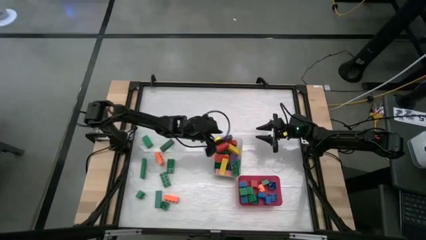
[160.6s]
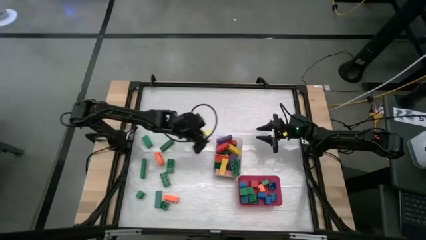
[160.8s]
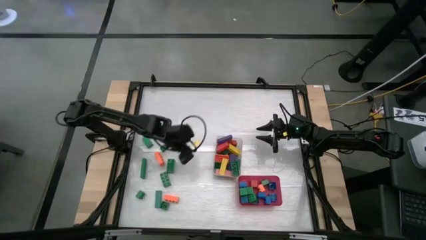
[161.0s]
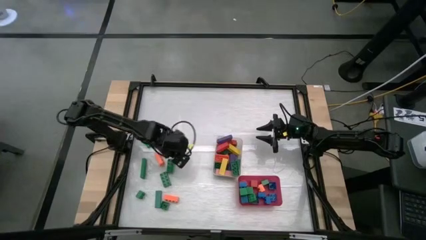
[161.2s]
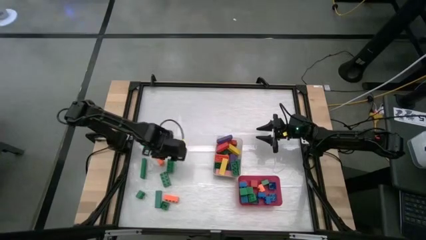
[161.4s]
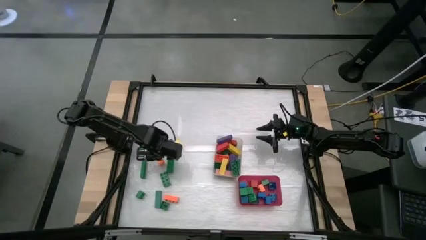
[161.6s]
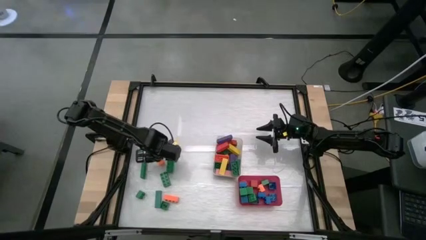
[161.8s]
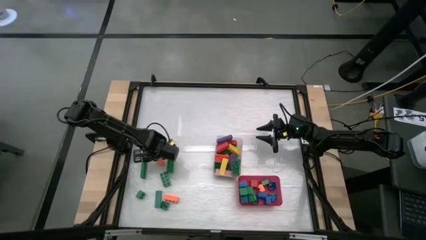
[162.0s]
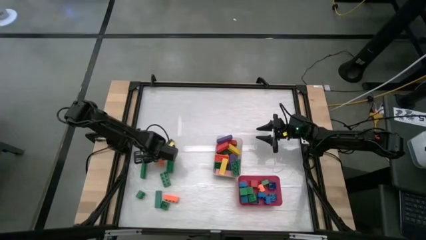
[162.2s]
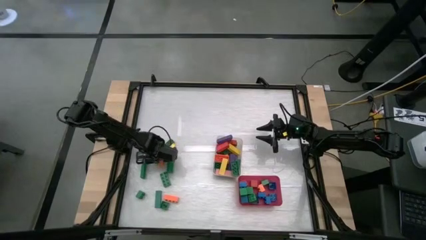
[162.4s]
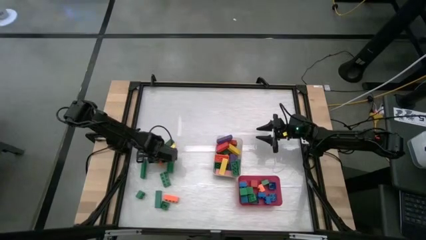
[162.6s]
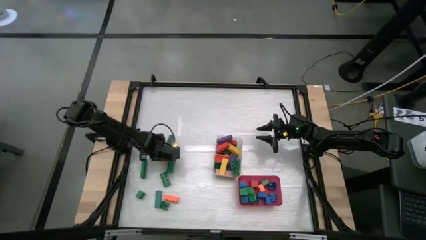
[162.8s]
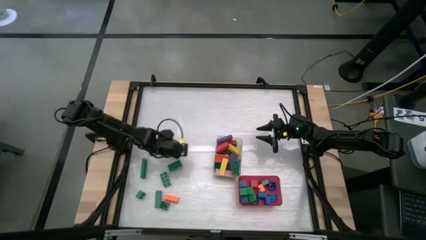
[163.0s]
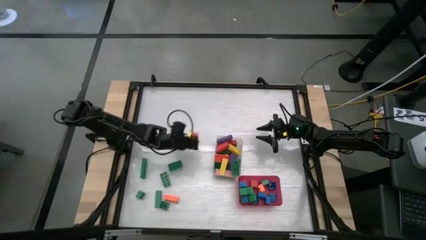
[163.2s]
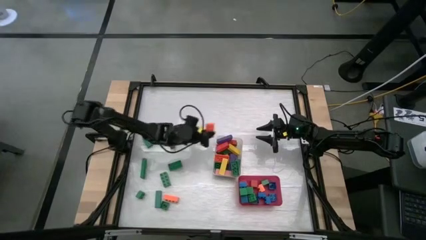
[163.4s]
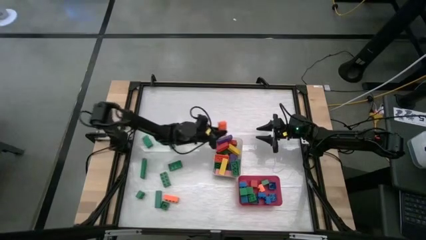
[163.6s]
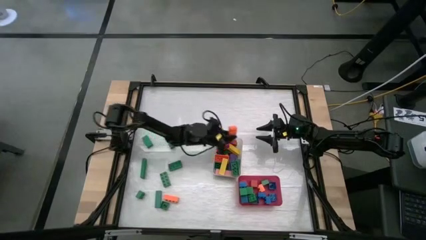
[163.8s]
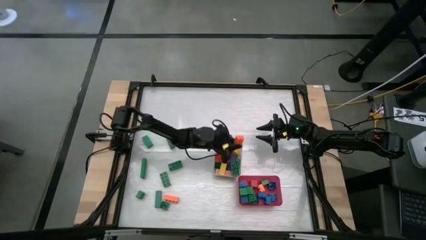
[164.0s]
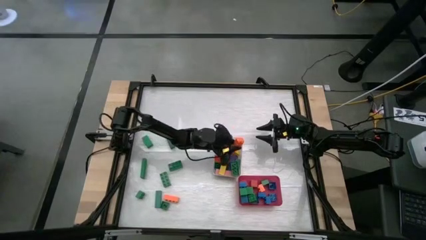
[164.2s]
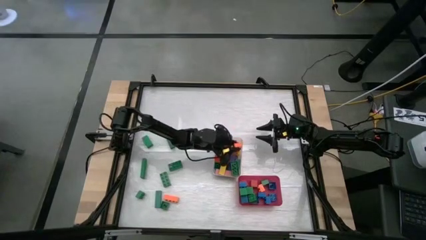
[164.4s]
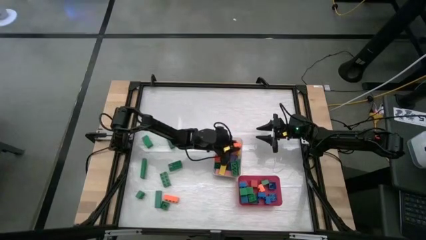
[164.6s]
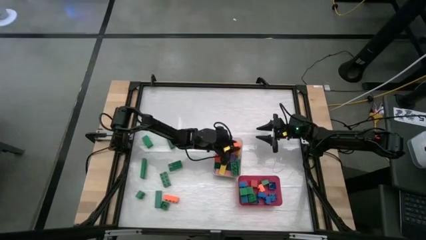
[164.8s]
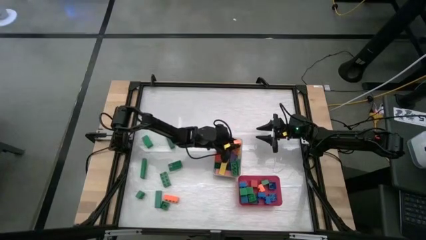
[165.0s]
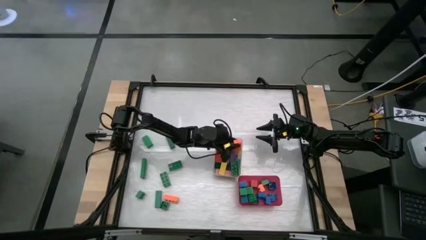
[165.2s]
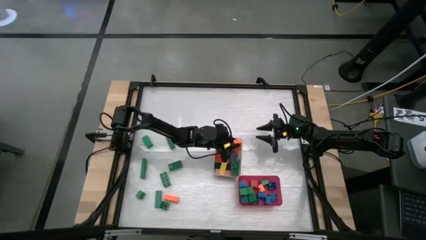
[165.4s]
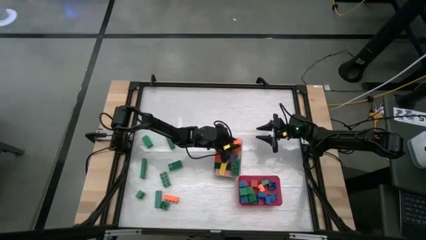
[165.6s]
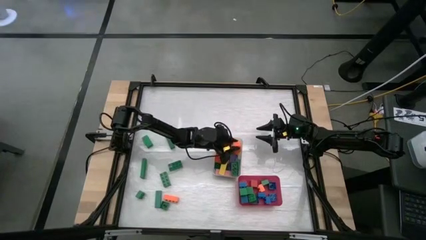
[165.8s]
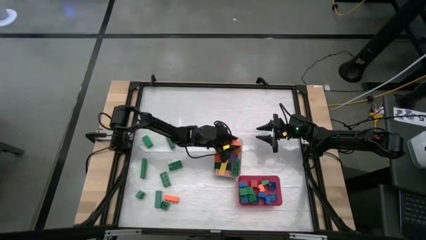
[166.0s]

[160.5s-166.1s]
Task: Sort blocks by size
Put the orange rectangular game piece into the transparent bin

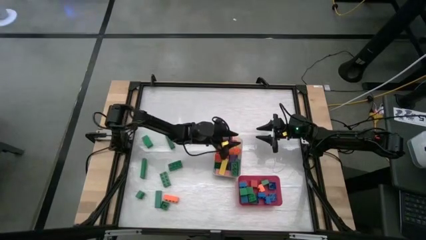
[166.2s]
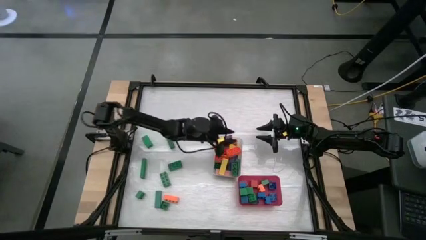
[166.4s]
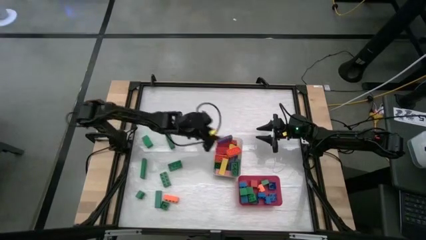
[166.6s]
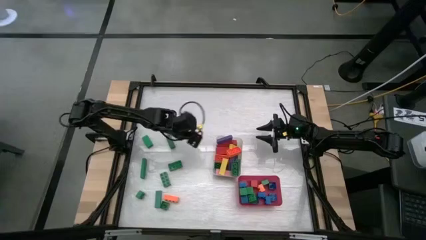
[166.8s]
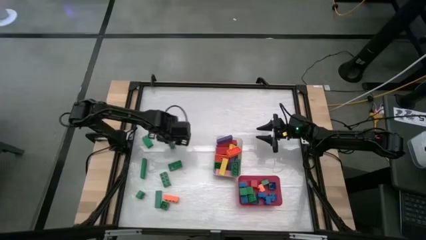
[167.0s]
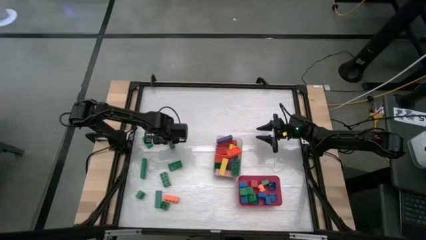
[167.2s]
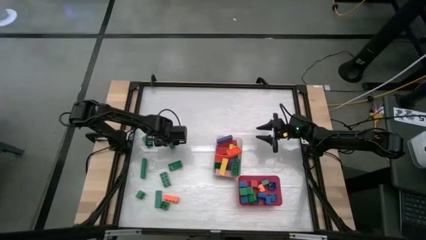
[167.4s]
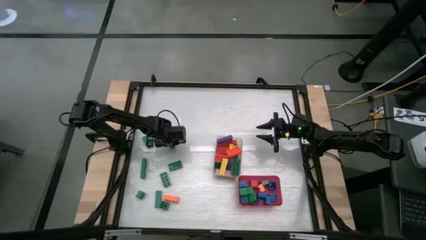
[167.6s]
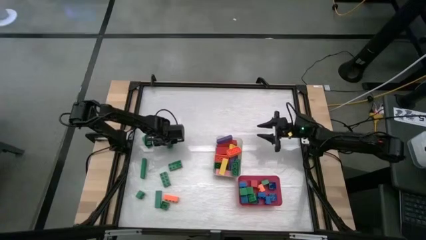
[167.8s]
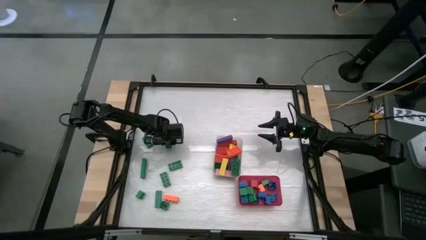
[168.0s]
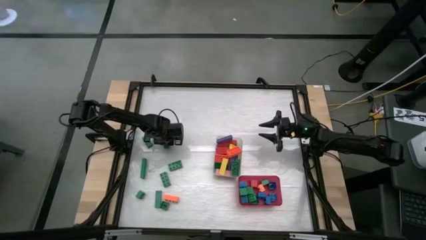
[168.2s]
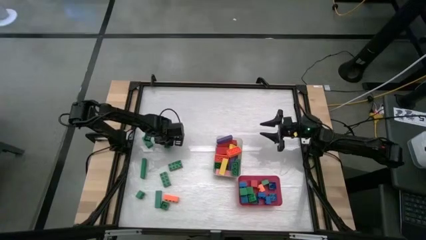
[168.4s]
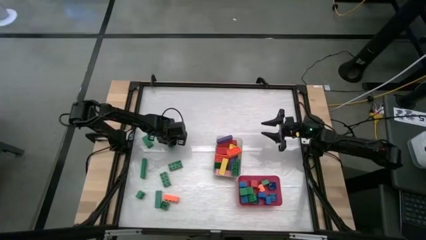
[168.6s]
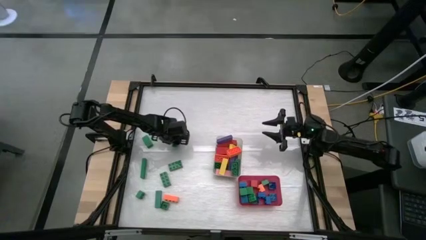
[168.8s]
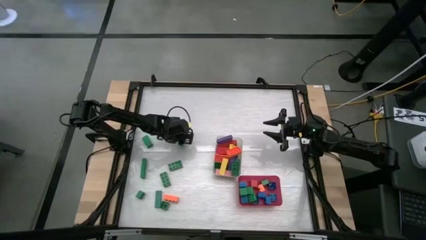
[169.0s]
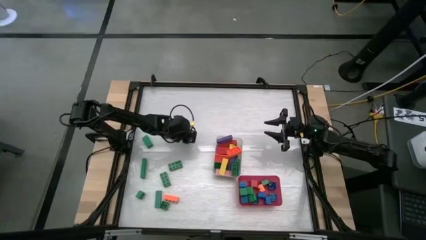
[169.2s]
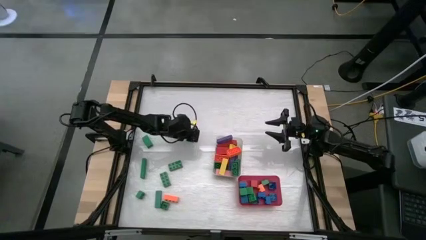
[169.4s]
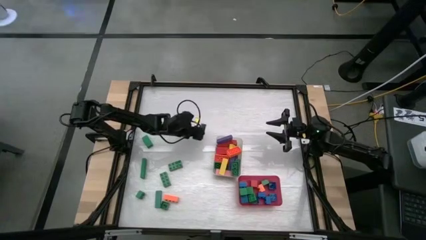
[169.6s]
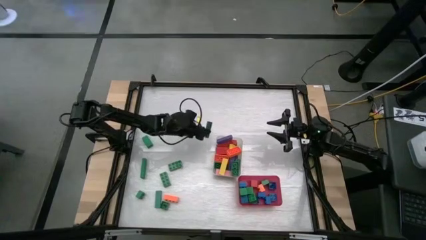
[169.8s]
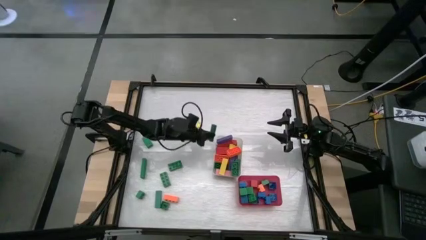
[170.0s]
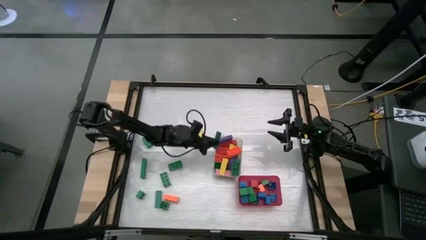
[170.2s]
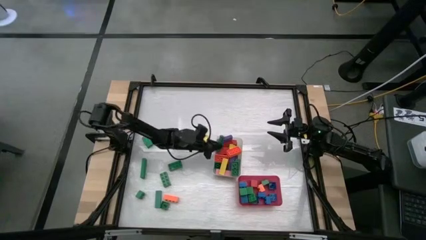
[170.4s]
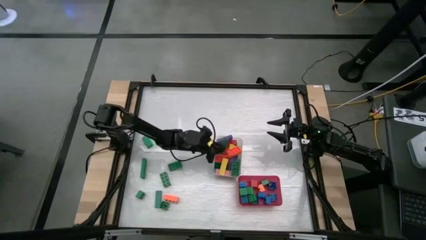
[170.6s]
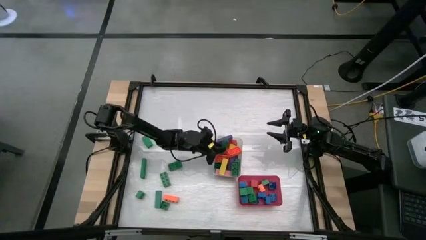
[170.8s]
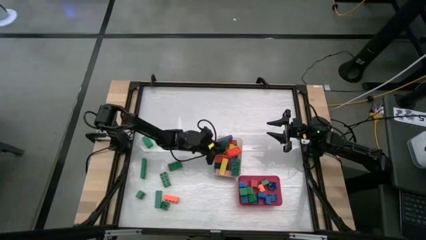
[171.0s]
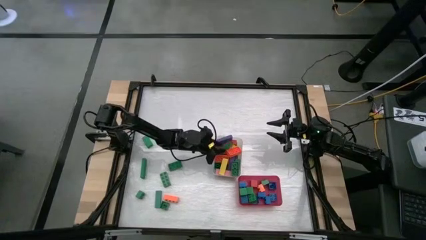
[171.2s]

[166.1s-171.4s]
Put the green rectangular block into the transparent bin

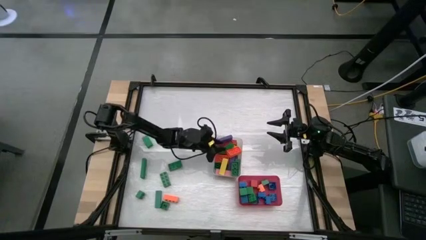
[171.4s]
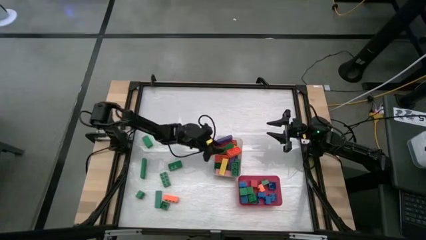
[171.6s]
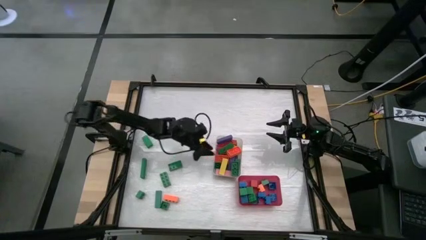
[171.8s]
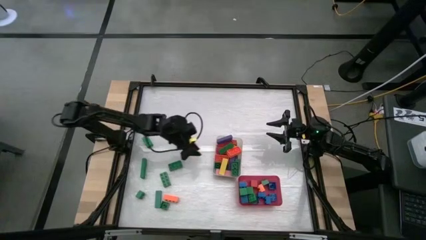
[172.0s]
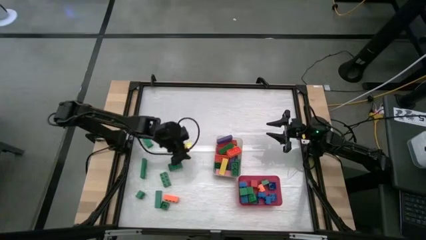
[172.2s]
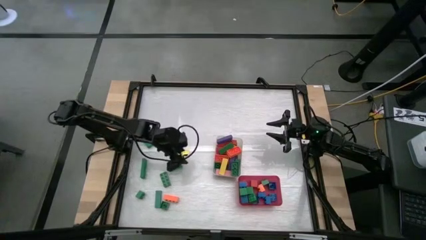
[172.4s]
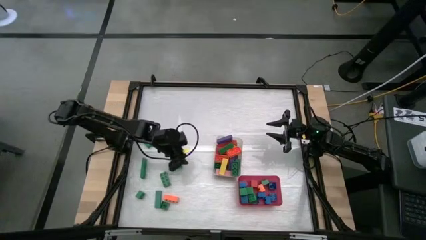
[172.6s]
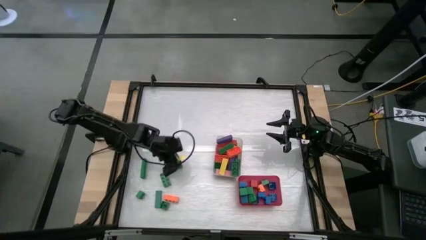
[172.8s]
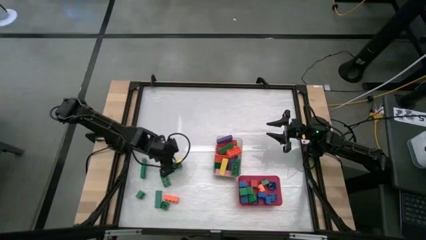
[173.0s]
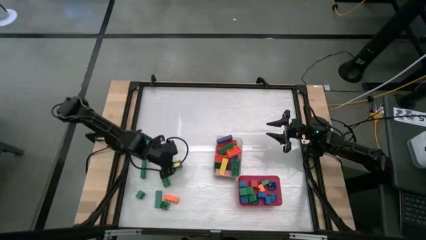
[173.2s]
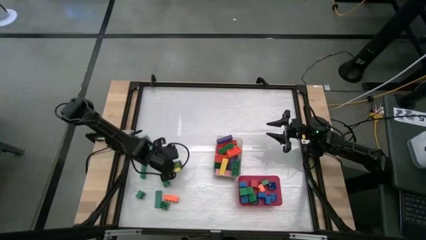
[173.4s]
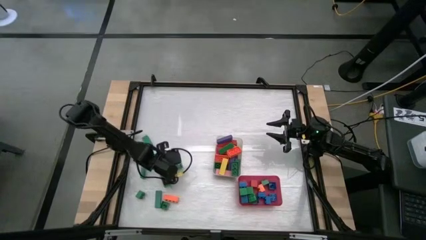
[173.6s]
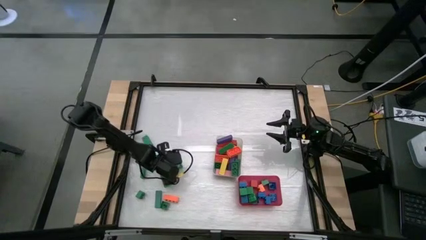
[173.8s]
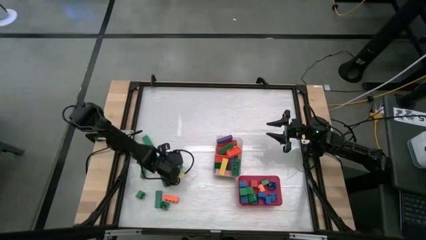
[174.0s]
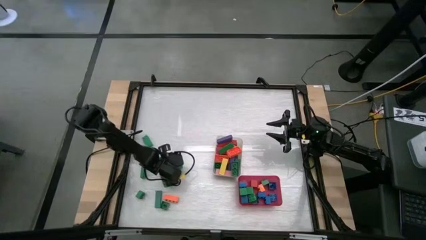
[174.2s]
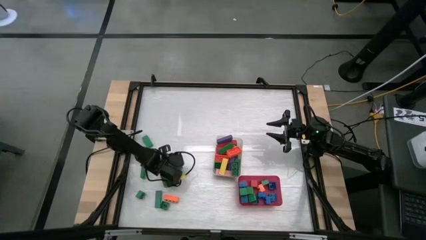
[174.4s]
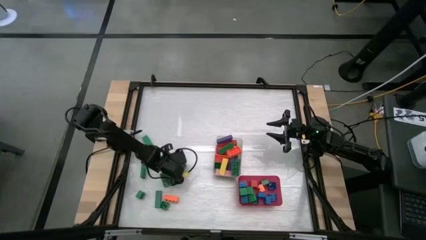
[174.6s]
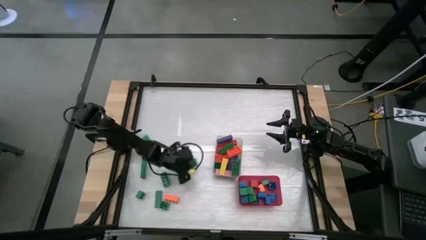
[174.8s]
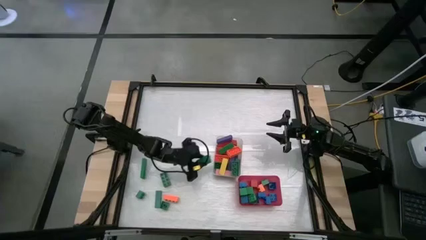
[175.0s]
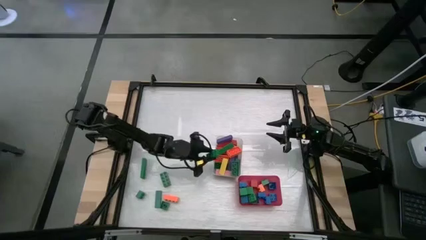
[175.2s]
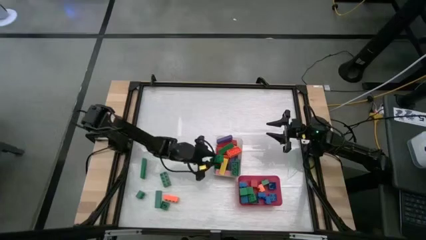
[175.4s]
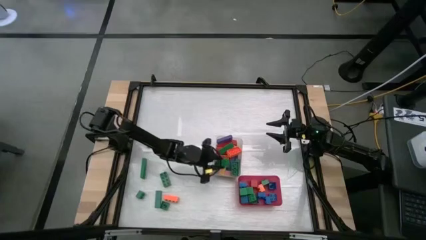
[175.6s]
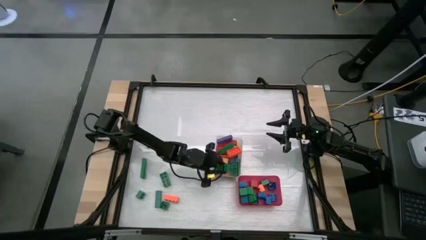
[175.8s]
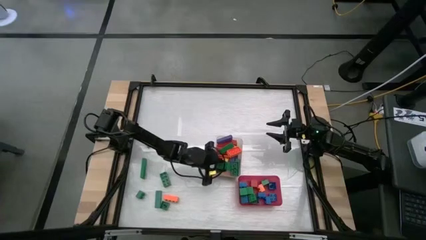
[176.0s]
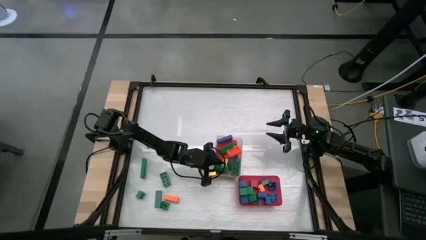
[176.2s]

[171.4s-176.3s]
Put the green rectangular game piece into the transparent bin

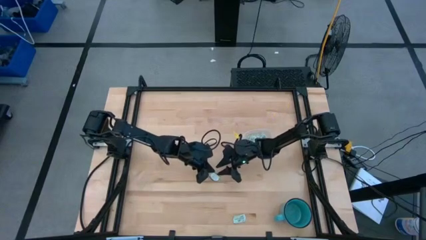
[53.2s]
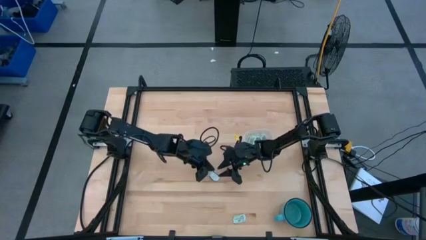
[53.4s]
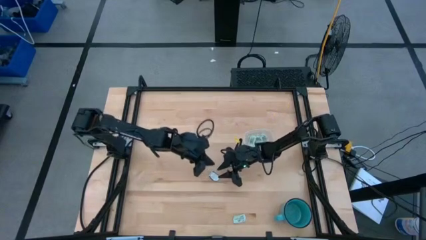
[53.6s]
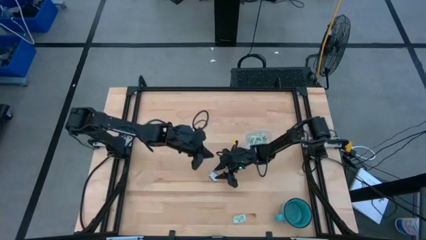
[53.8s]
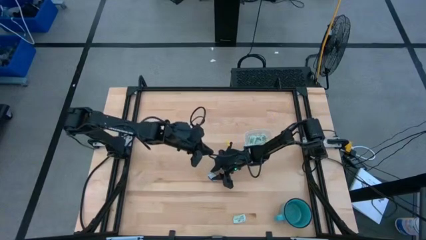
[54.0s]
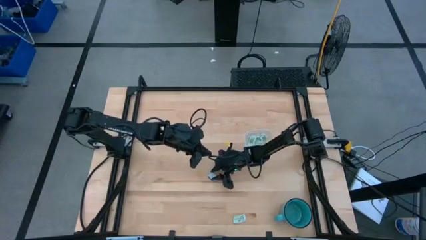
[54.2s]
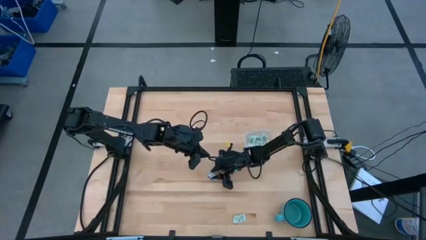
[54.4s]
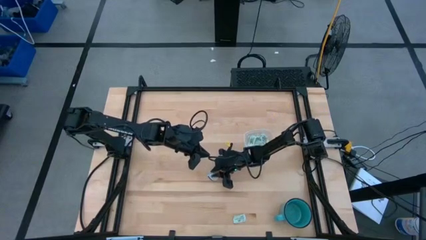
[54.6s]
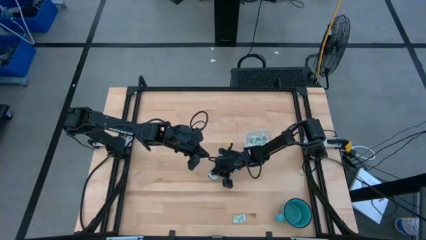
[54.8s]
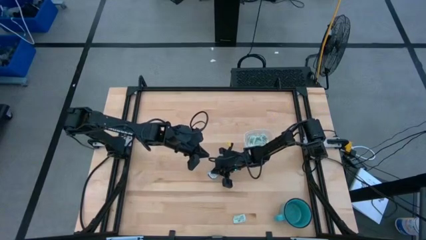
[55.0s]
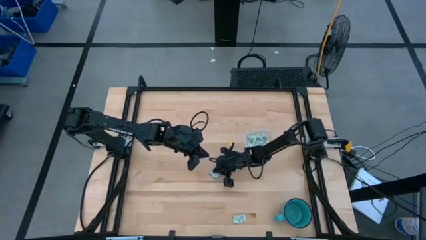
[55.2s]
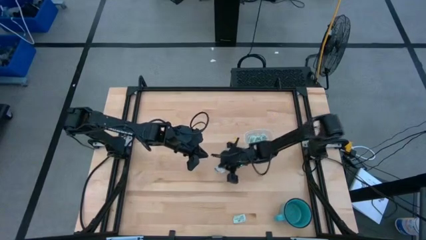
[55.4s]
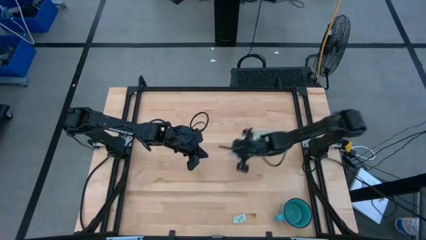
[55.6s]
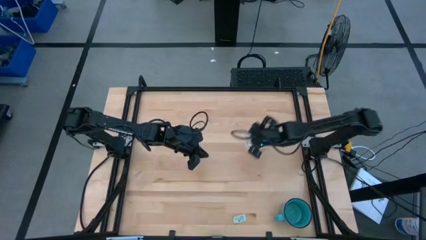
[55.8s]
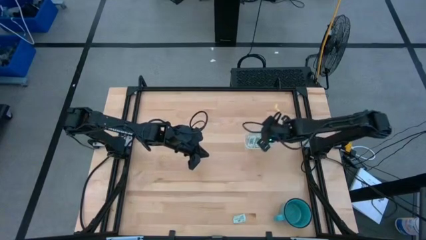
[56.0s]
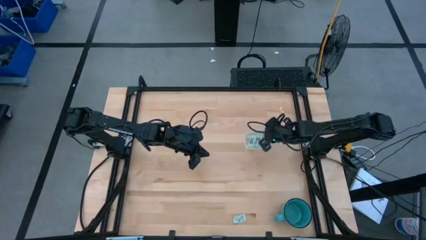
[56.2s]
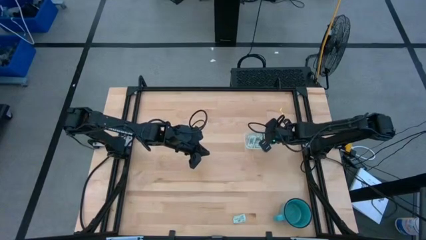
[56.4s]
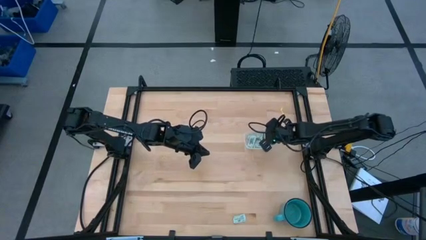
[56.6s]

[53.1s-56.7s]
Task: Pick and place Stevia / Truvia into bins
Put the white truvia packet into the transparent bin
